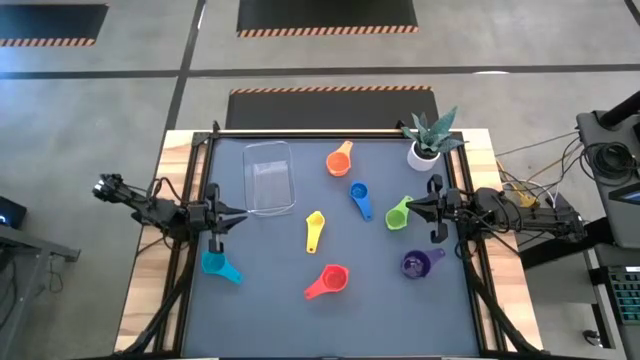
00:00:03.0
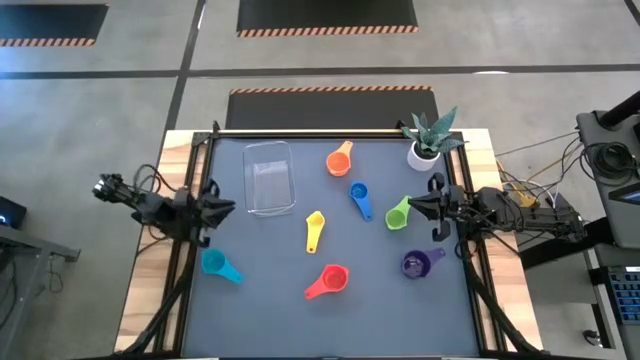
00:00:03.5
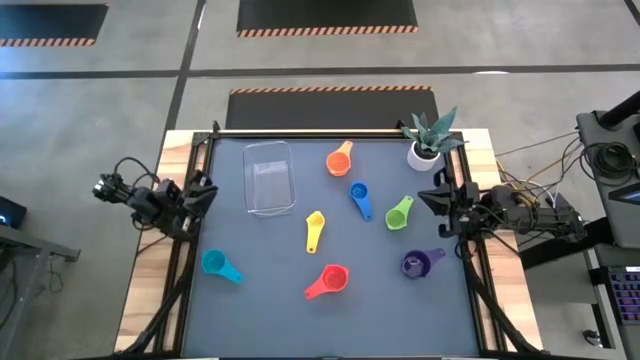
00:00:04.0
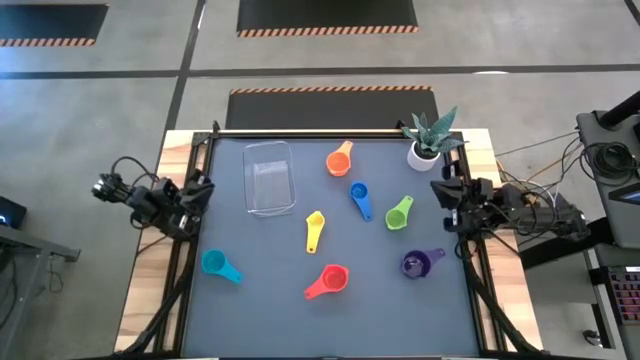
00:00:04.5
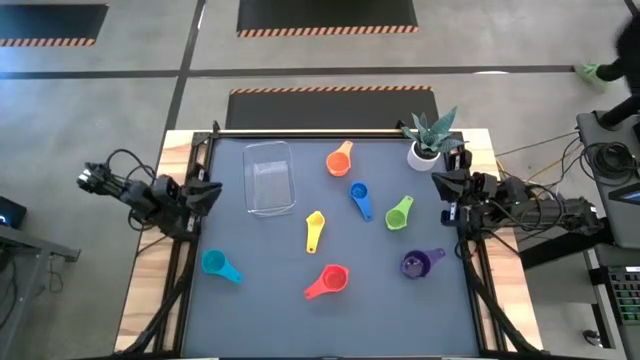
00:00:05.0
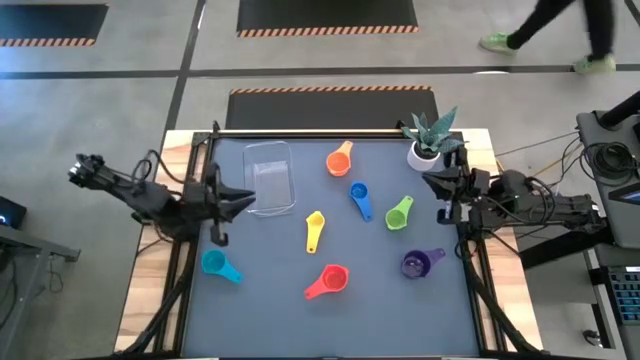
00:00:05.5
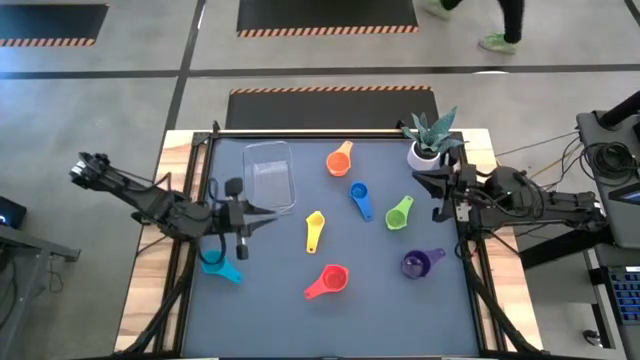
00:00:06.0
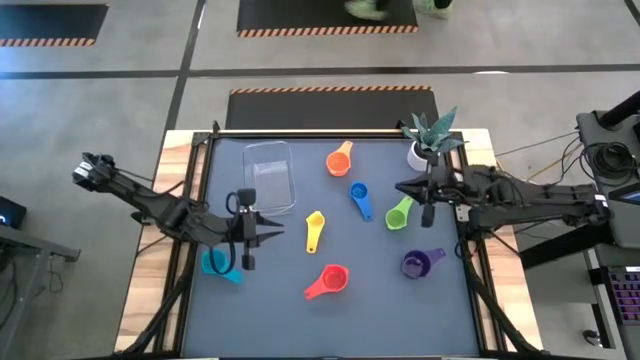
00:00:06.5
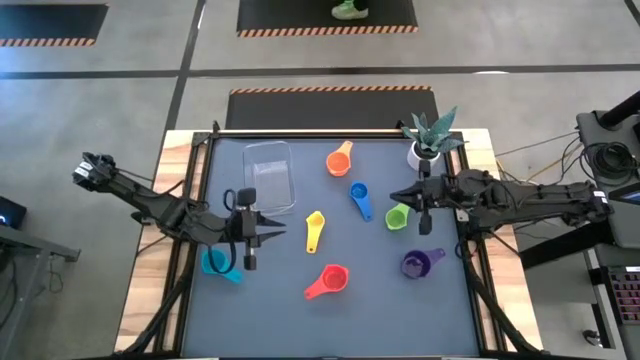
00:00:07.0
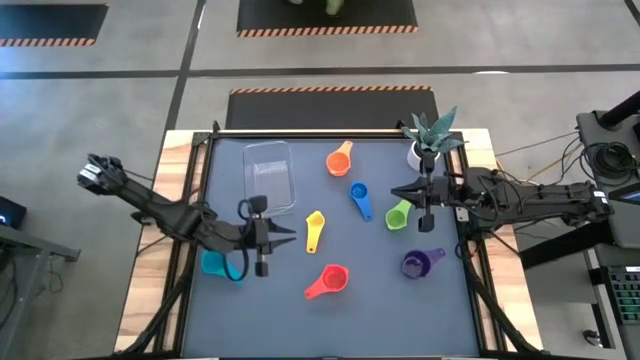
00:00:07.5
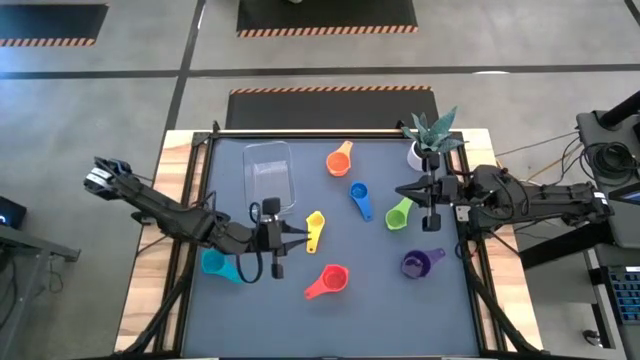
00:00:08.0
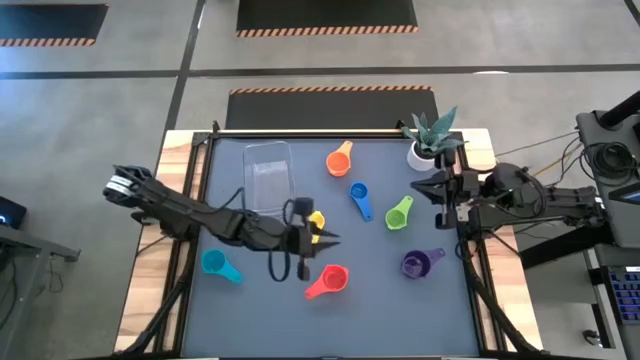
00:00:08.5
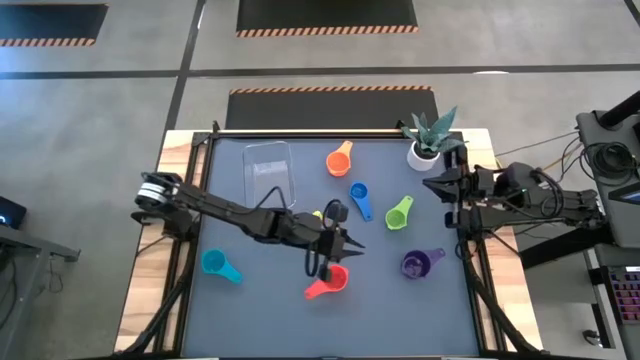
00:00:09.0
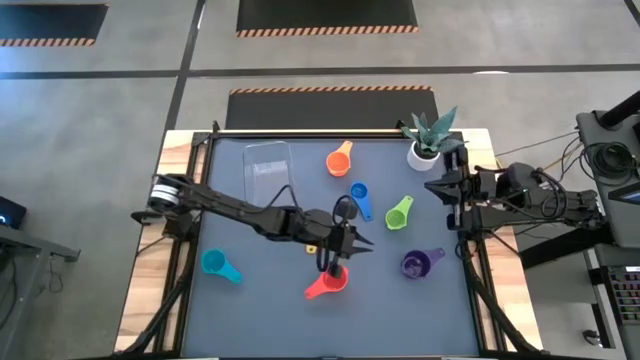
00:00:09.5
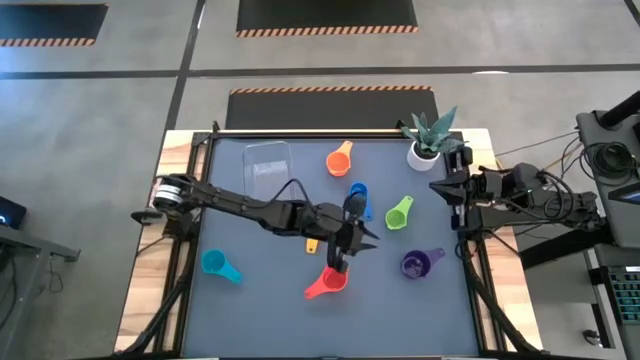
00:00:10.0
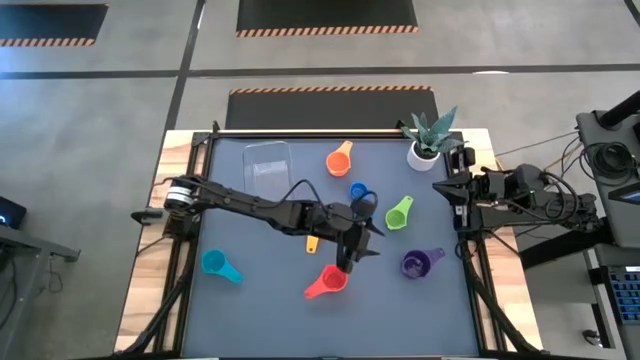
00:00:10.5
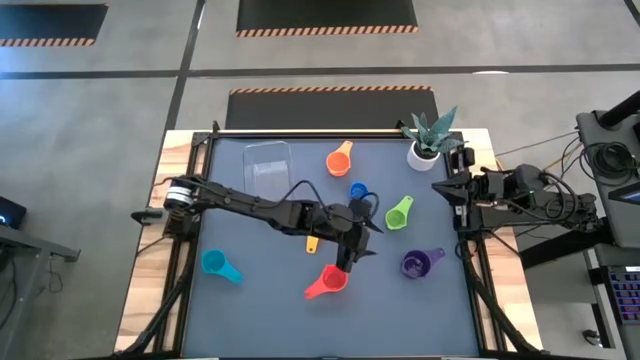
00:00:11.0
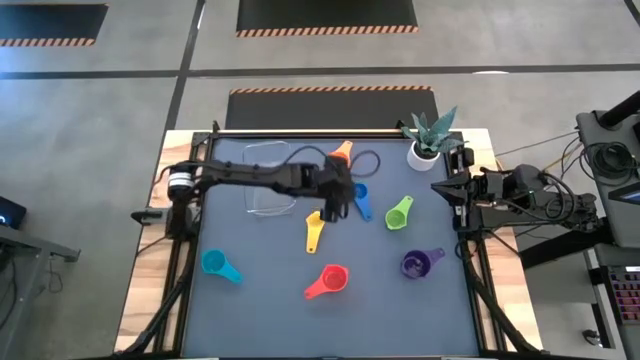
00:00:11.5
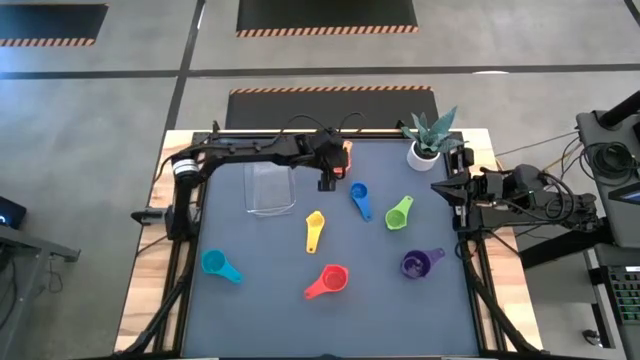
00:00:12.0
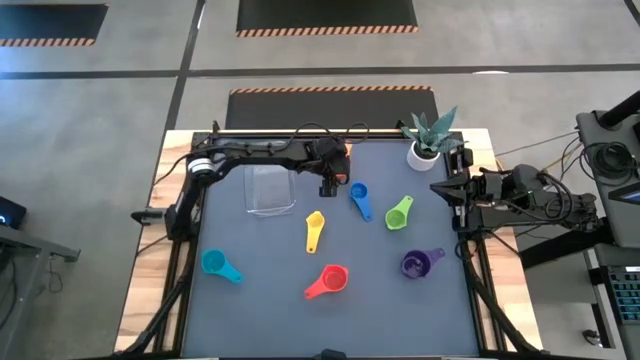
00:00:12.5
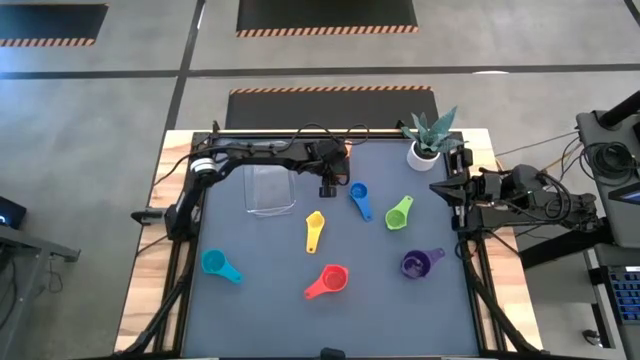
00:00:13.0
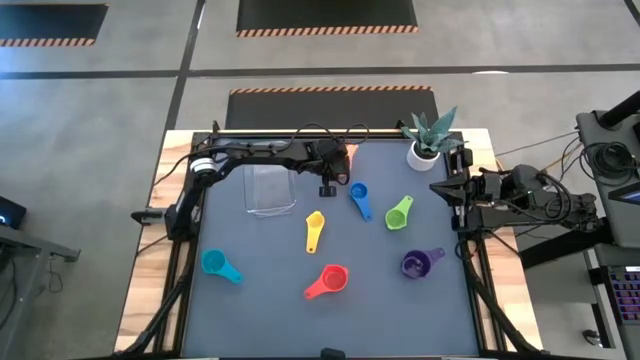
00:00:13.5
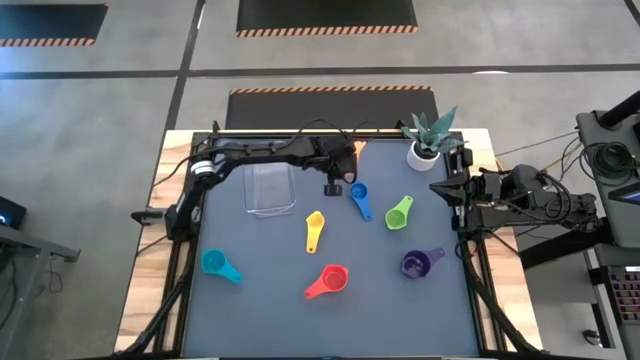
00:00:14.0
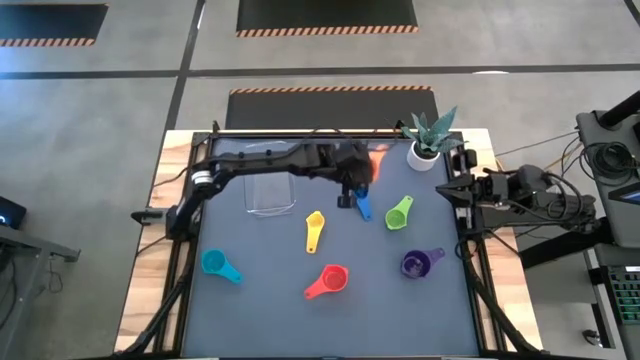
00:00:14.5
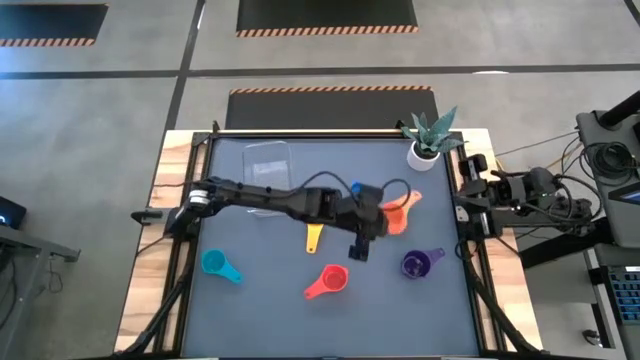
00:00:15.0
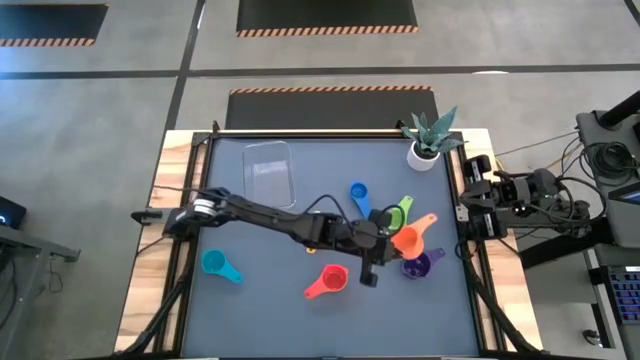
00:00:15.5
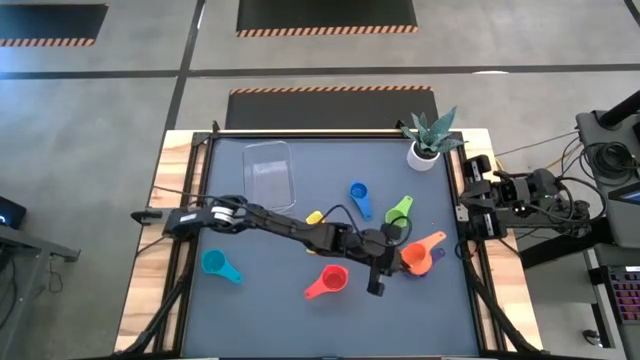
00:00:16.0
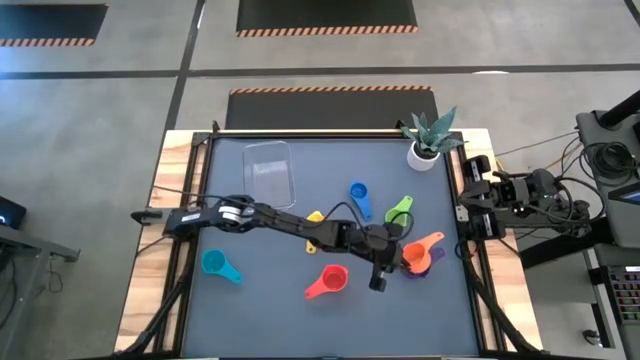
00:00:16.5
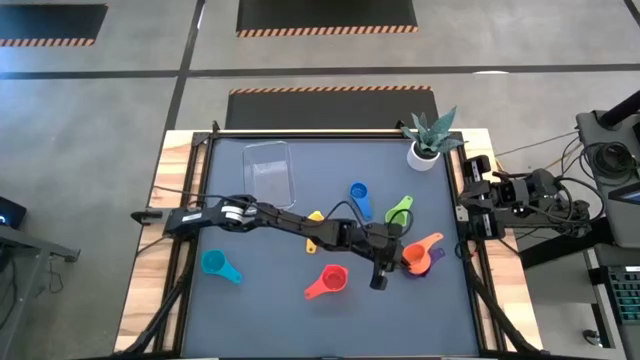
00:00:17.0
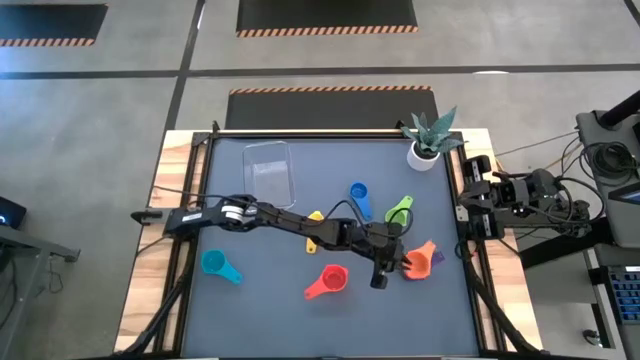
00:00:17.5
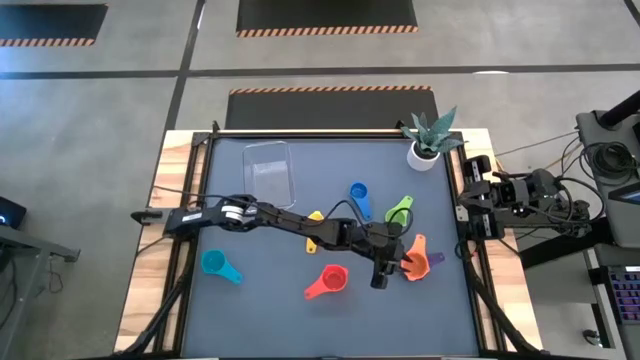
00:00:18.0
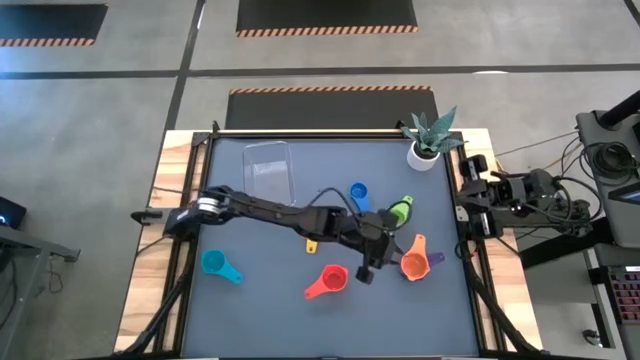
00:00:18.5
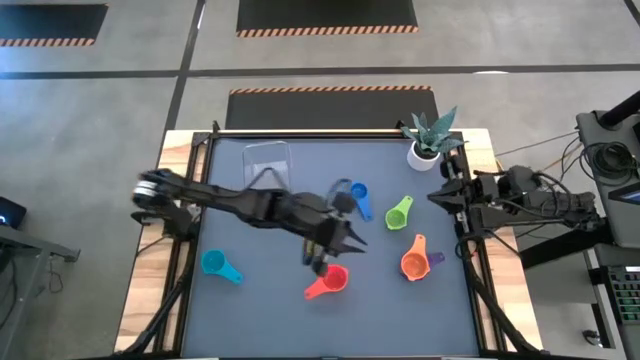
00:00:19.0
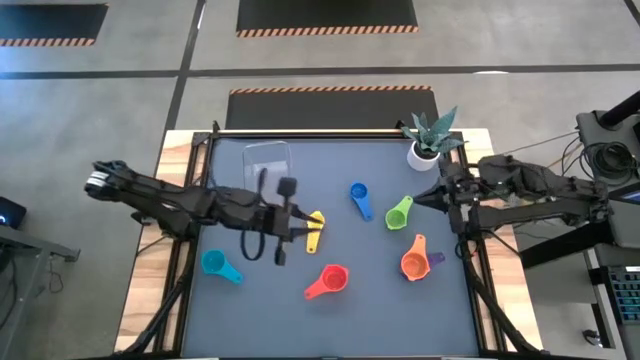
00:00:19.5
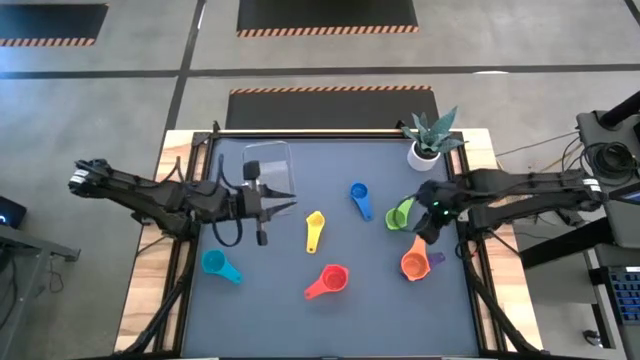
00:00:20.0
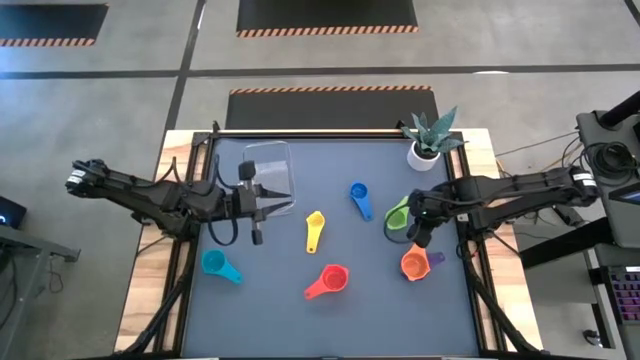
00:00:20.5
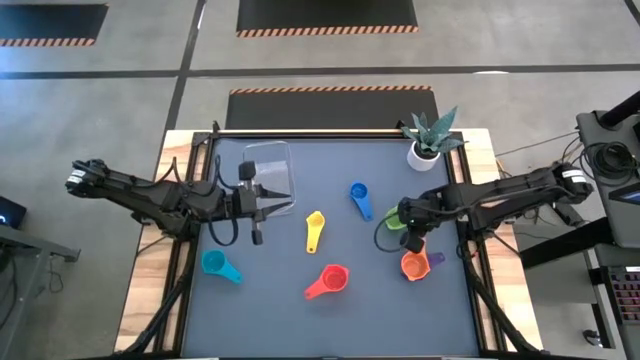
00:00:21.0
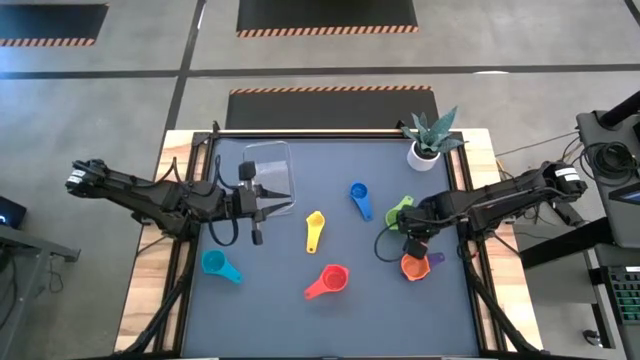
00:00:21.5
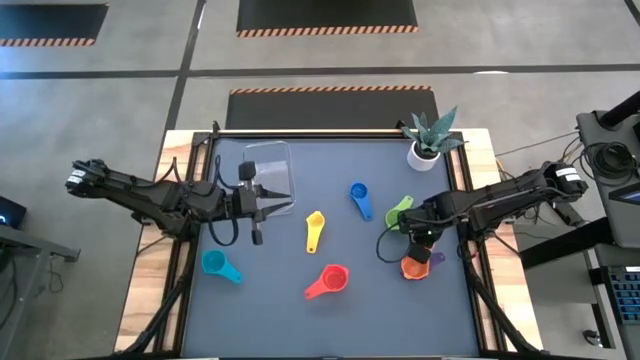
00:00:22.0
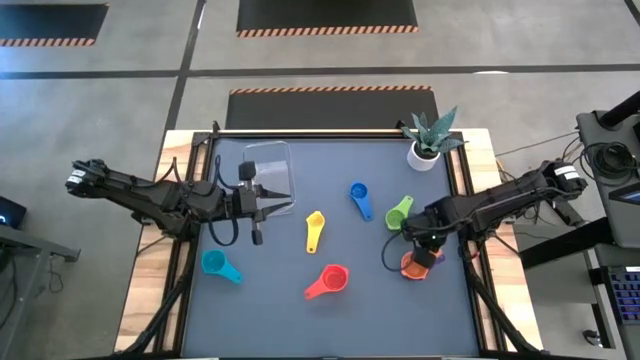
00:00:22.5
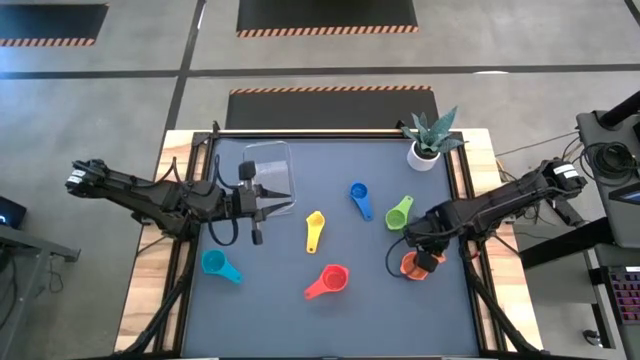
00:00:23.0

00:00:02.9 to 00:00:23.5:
Task: Nest measuring cups in basket
Stack the orange measuring cup on top of the violet measuring cup
